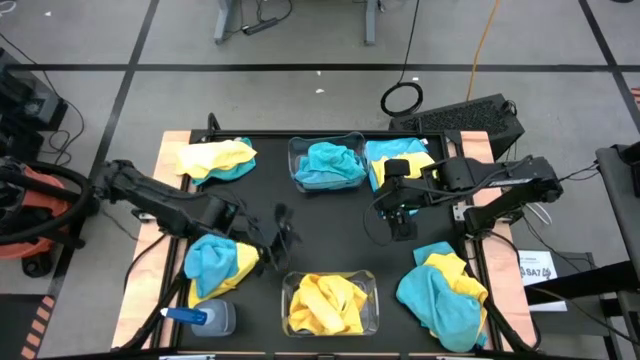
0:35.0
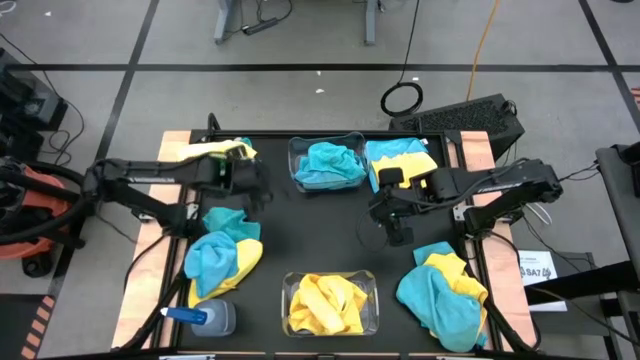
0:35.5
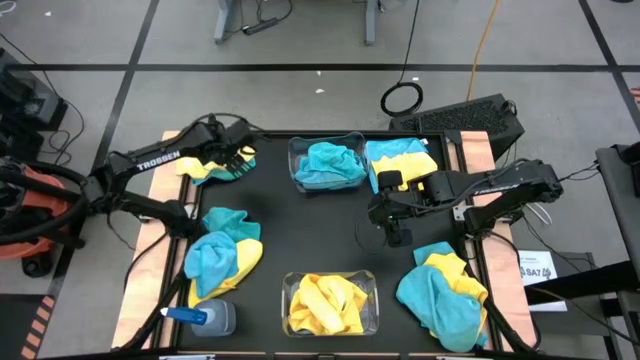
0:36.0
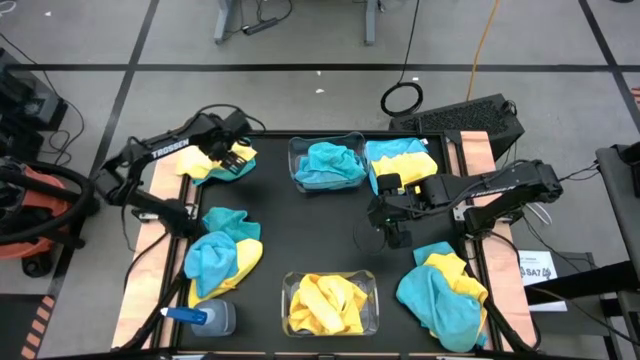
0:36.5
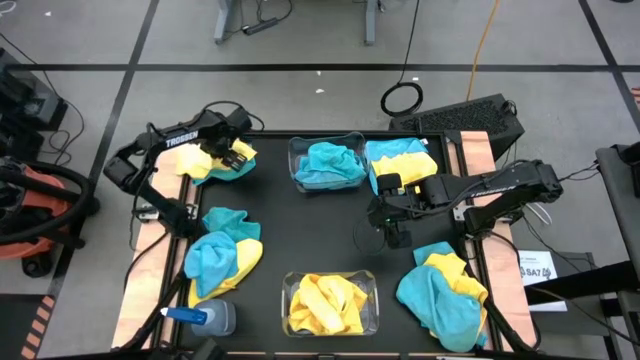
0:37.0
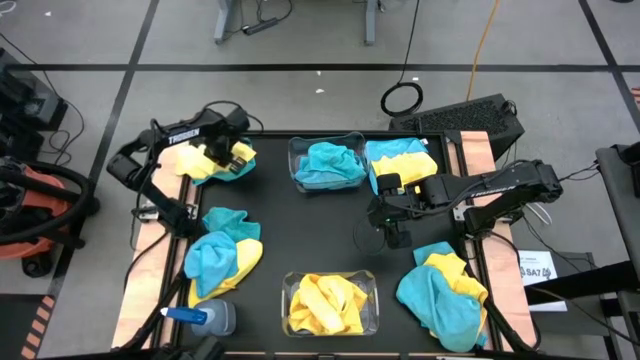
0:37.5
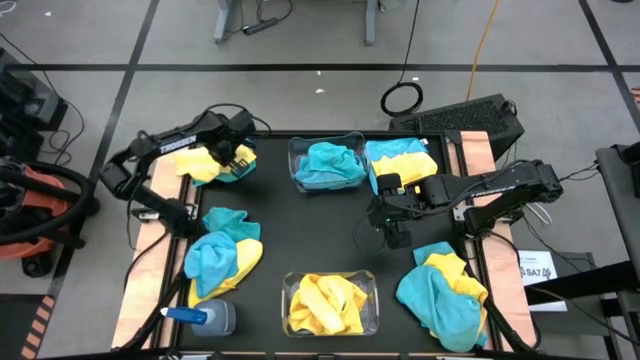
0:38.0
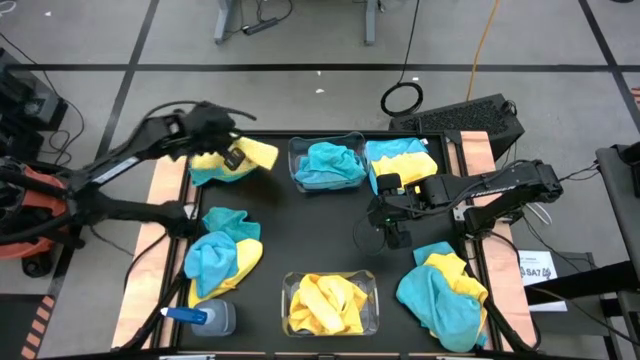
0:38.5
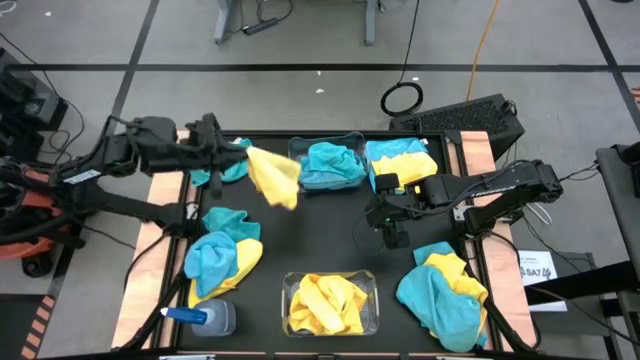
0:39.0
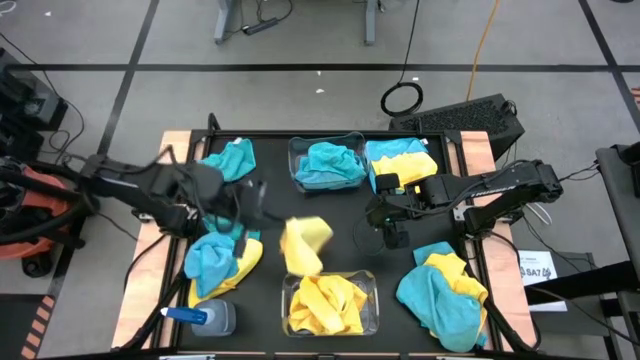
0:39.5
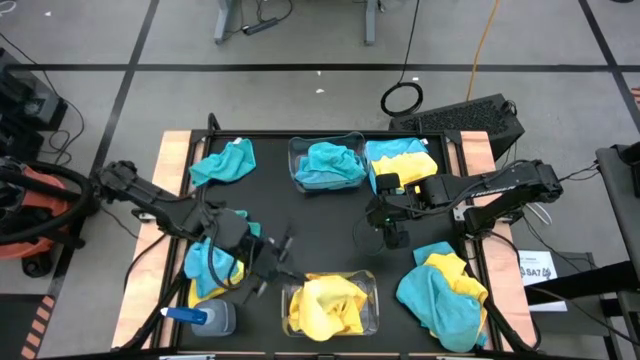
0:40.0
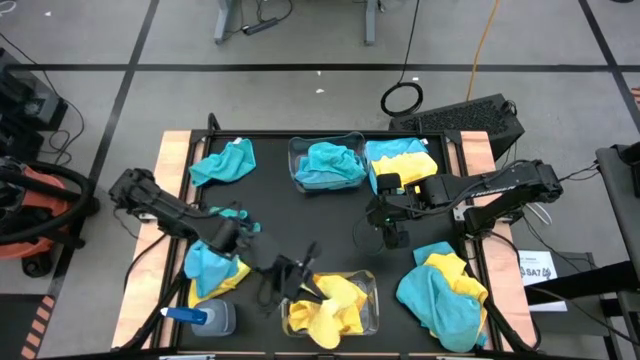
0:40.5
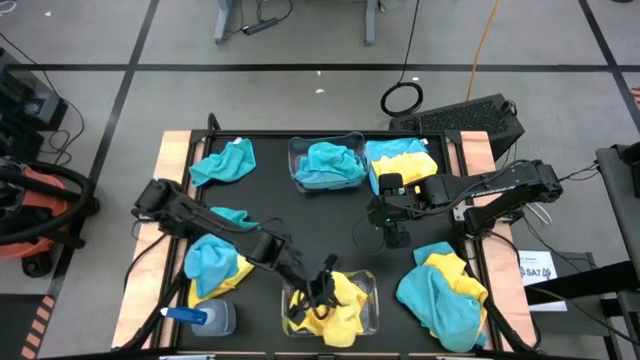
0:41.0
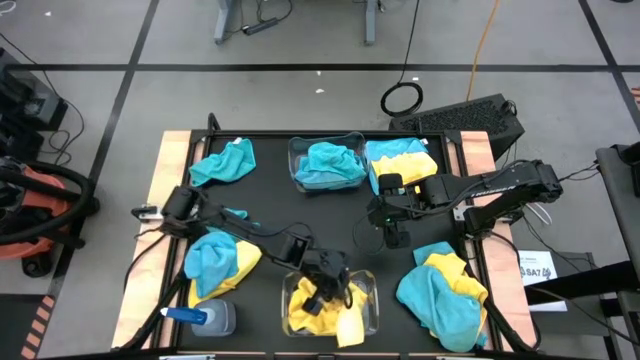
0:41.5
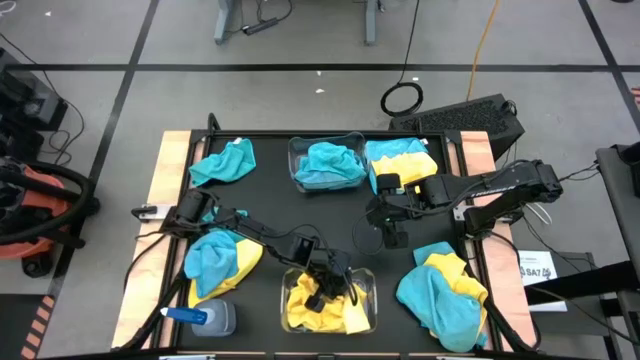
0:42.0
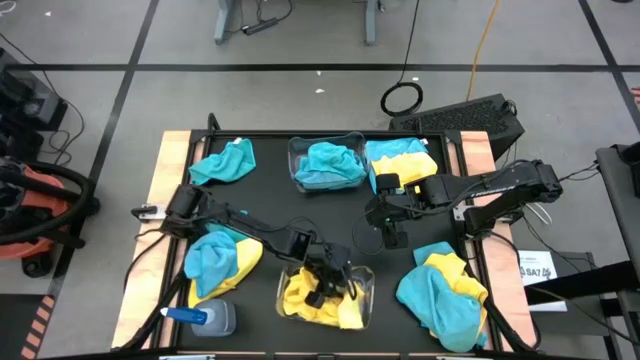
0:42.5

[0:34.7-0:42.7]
Task: Sort microfiber towel by color & place in baskets
Put the yellow microfiber towel into the bottom transparent bin

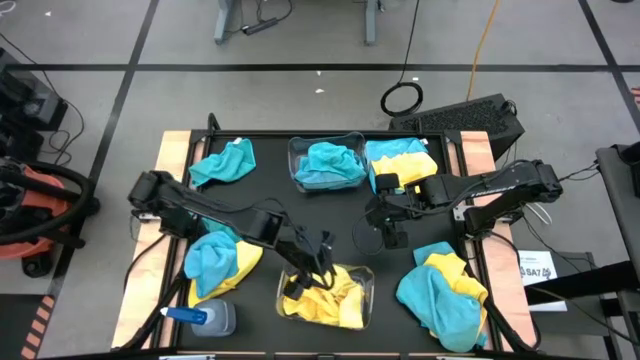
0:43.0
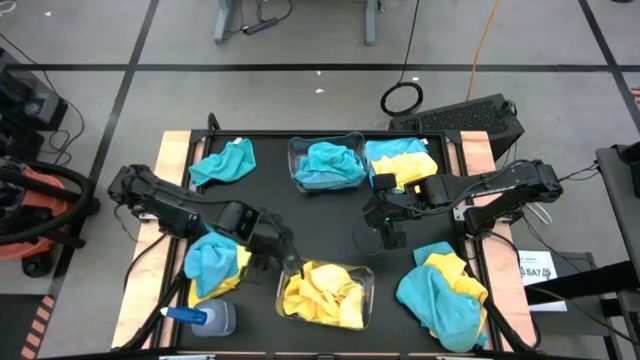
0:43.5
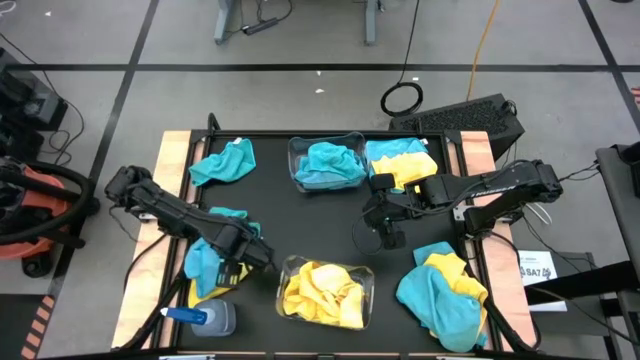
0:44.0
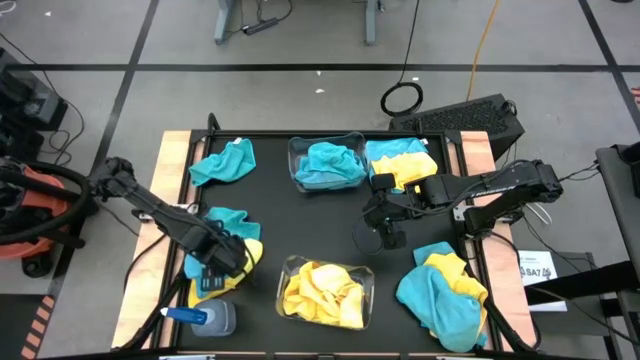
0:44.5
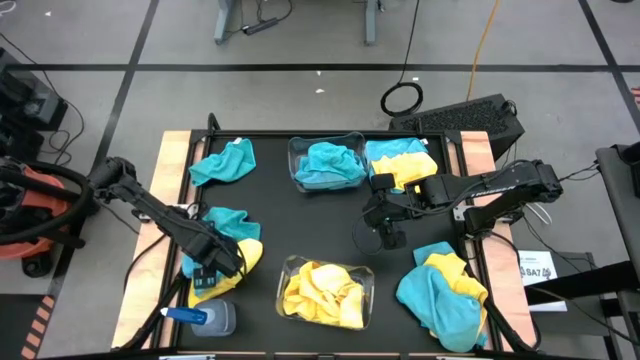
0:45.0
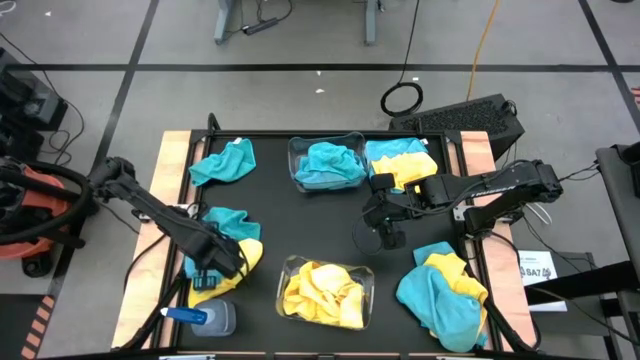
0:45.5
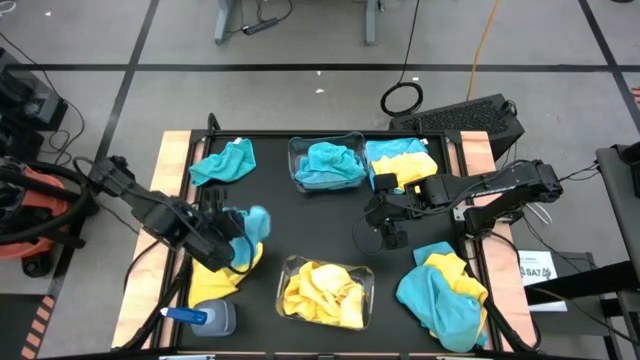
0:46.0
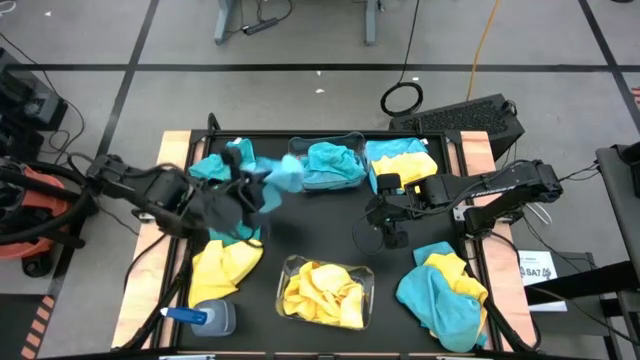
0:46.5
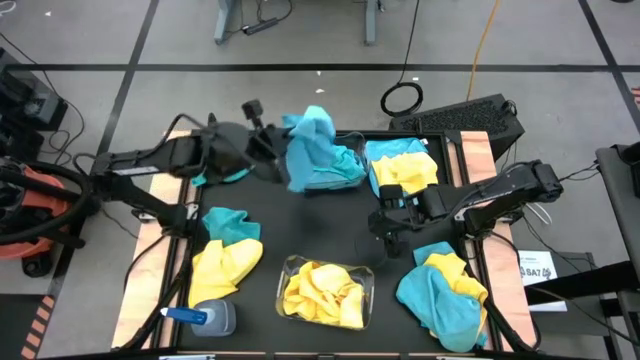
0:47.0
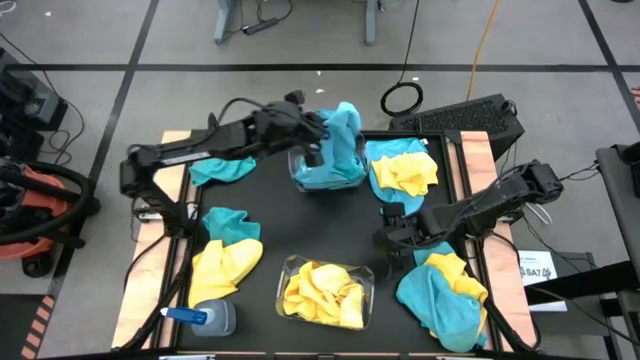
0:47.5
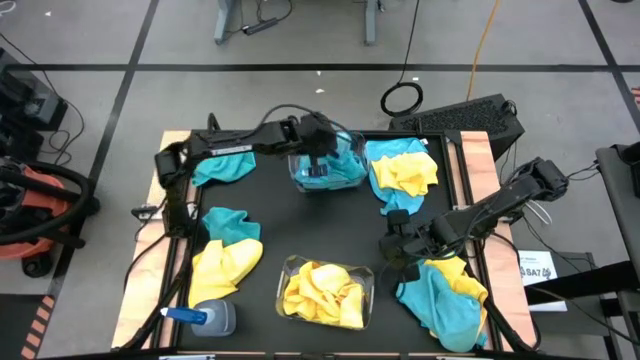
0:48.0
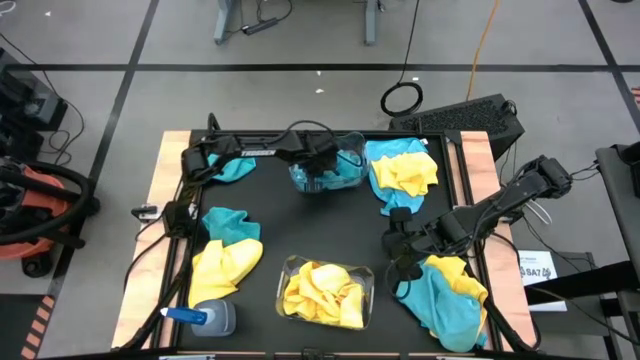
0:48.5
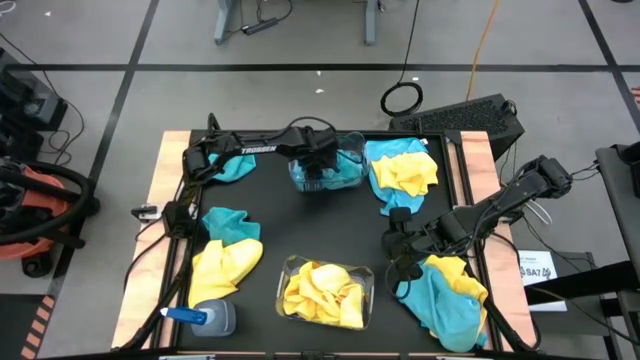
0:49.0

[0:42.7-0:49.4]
Put the blue microfiber towel into the top transparent bin

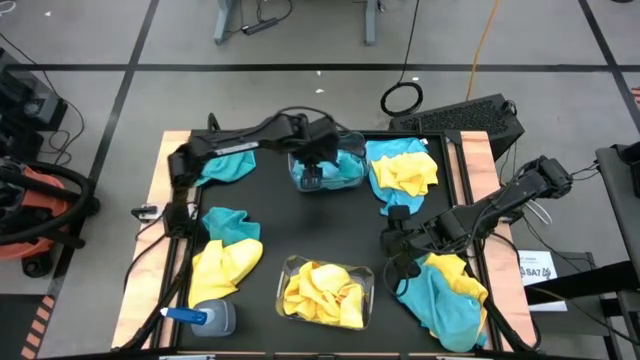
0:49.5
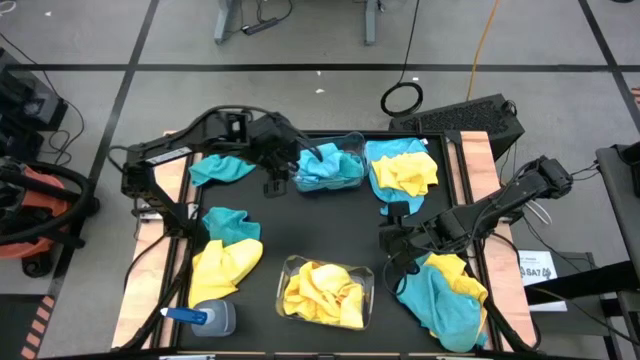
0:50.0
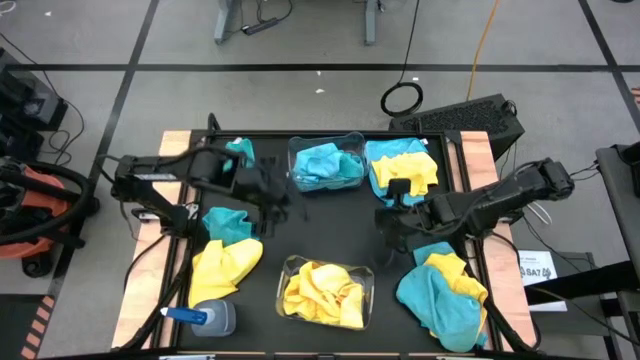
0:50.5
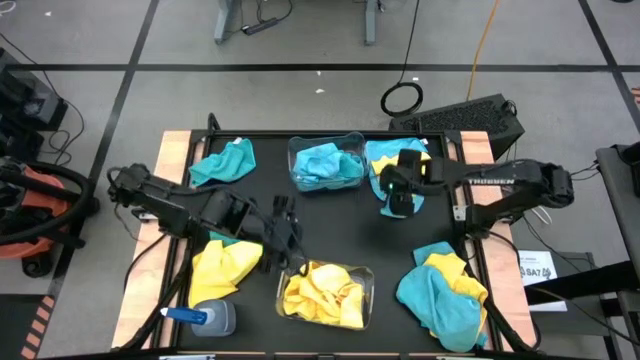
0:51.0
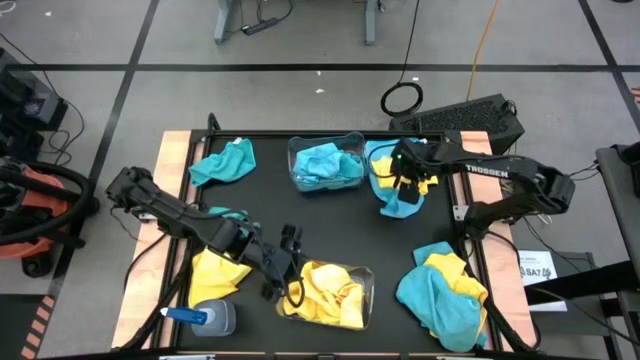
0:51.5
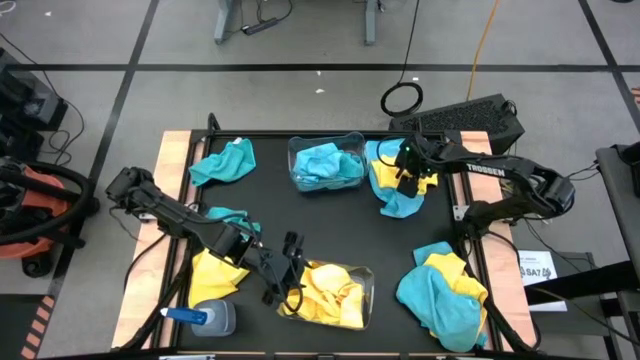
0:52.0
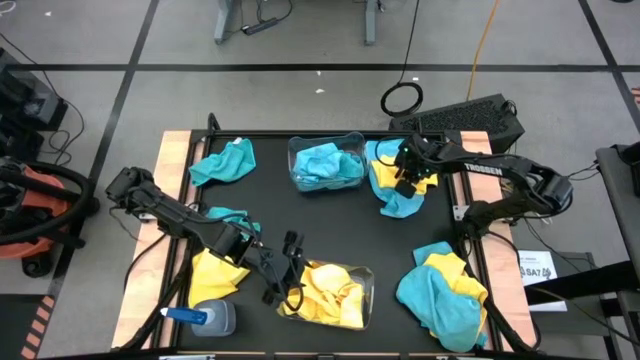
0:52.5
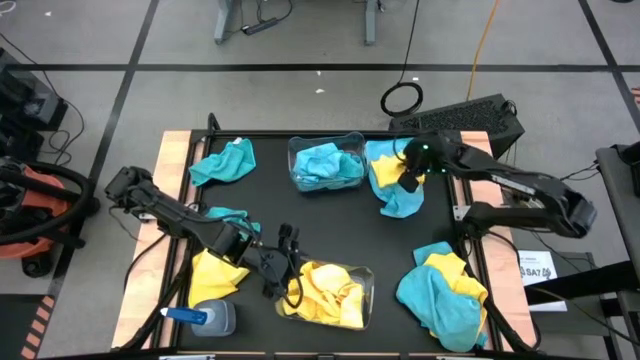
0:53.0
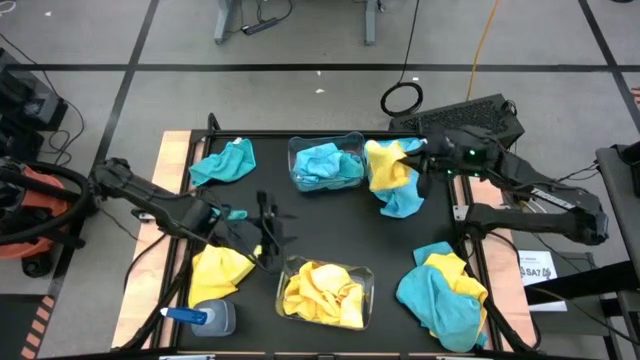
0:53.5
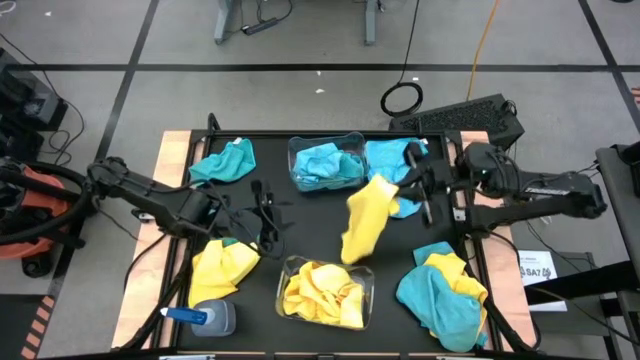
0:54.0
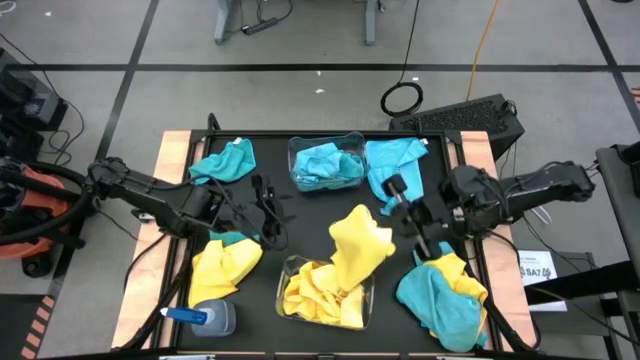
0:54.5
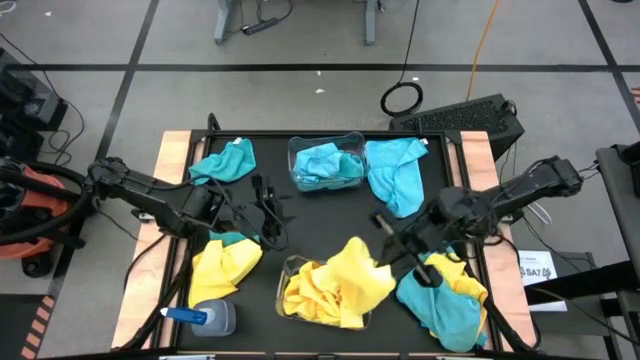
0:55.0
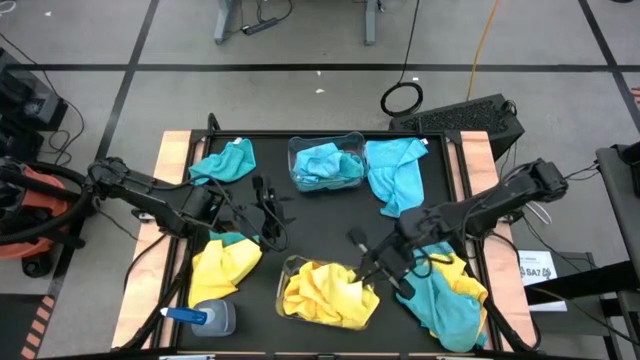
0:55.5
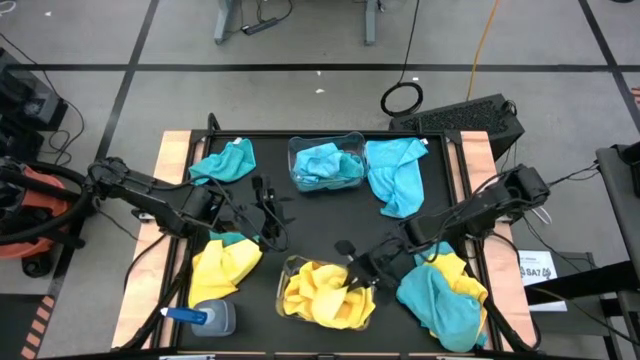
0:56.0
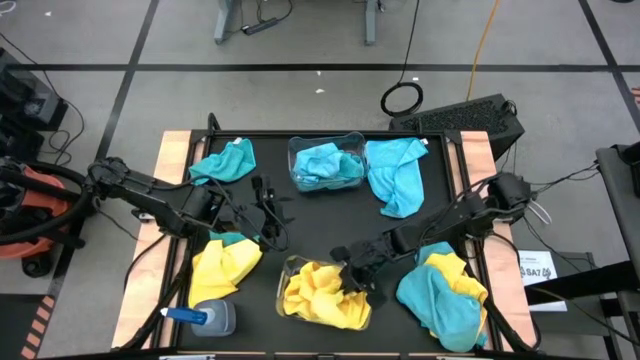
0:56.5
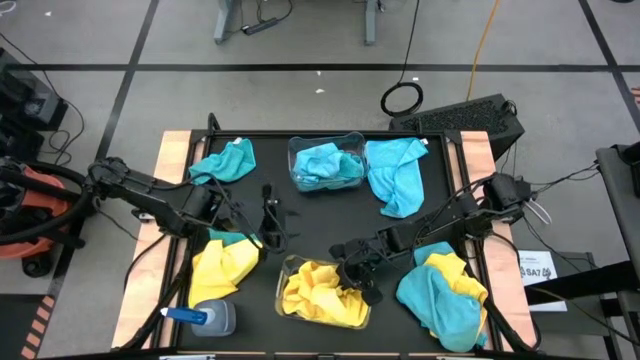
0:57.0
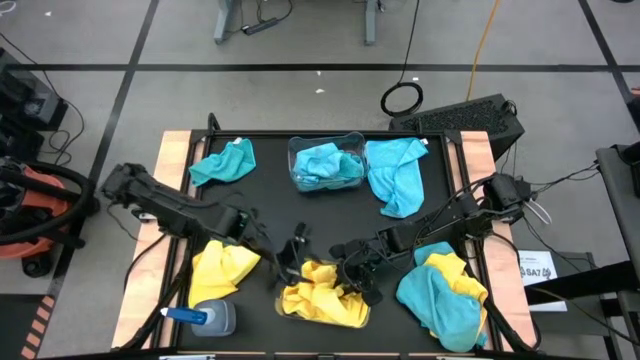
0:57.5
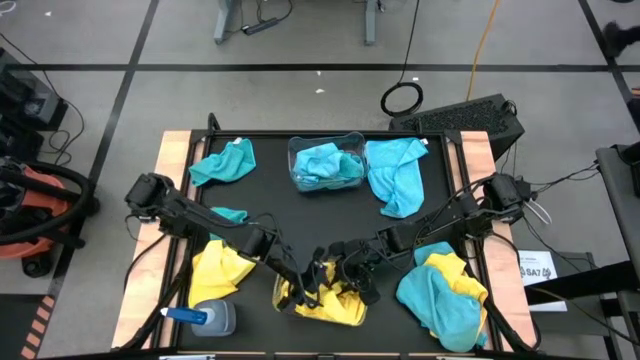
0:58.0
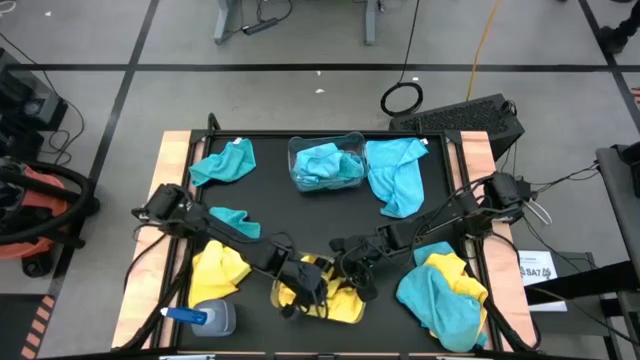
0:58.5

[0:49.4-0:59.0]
Put the yellow microfiber towel into the bottom transparent bin
